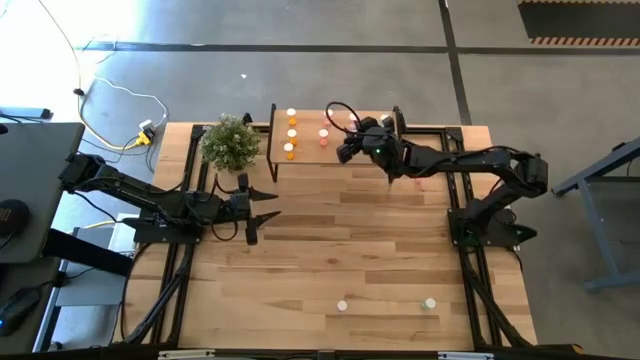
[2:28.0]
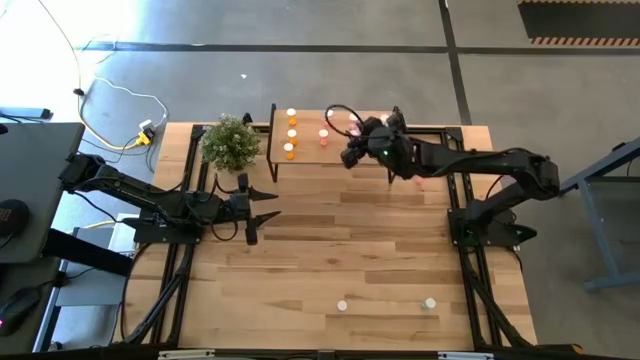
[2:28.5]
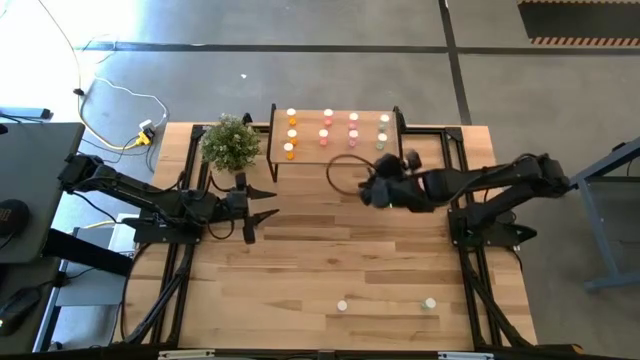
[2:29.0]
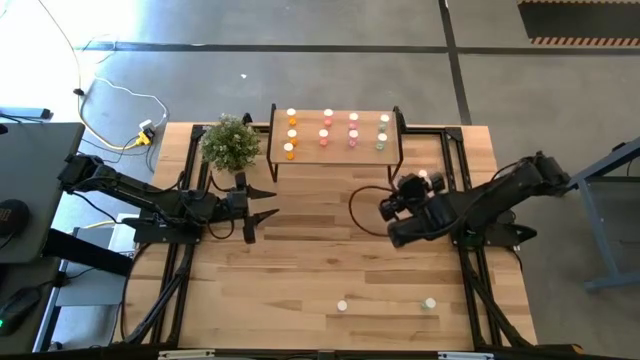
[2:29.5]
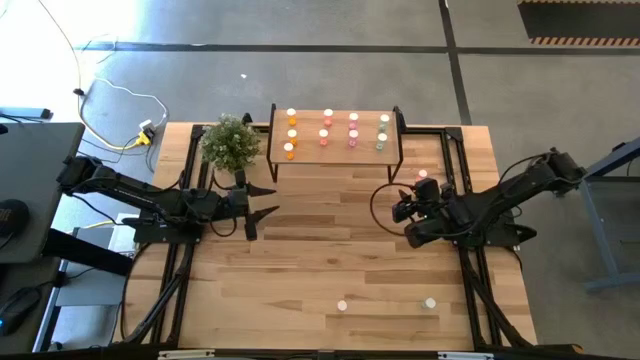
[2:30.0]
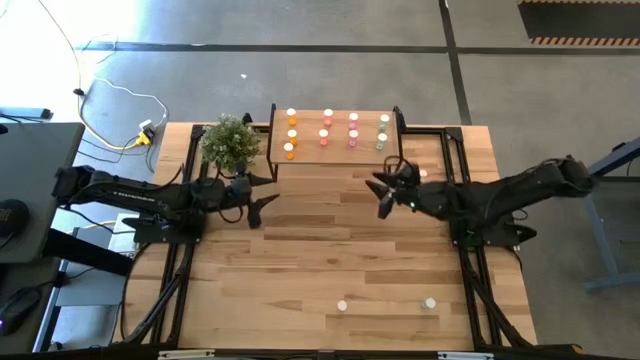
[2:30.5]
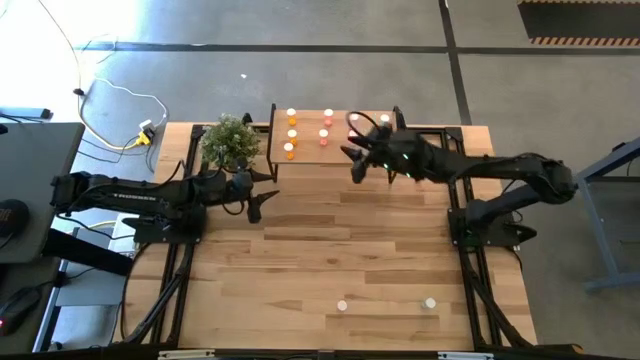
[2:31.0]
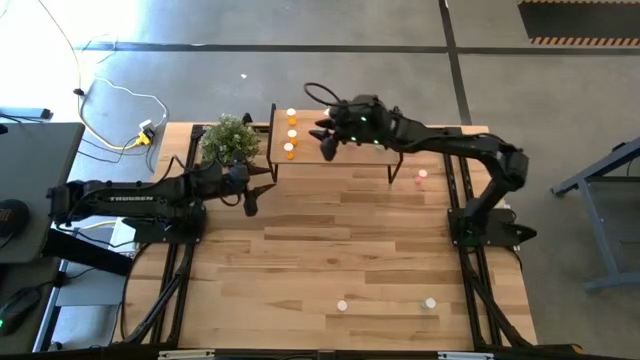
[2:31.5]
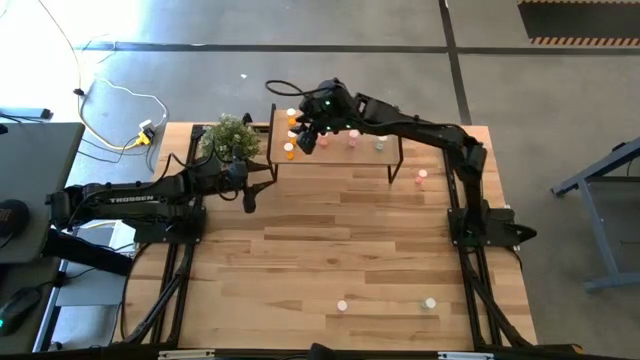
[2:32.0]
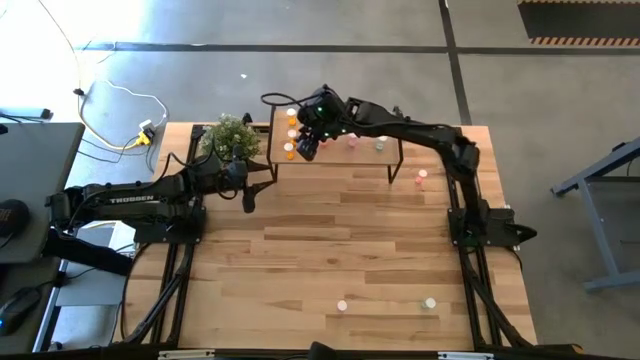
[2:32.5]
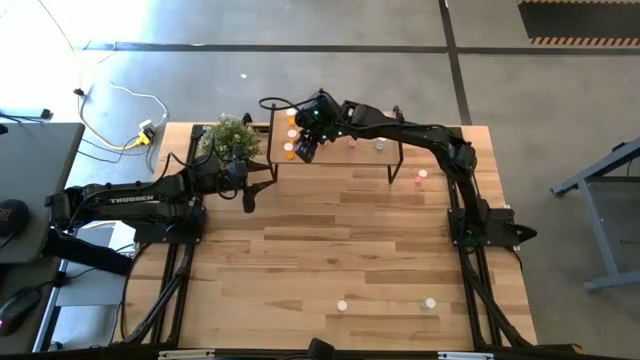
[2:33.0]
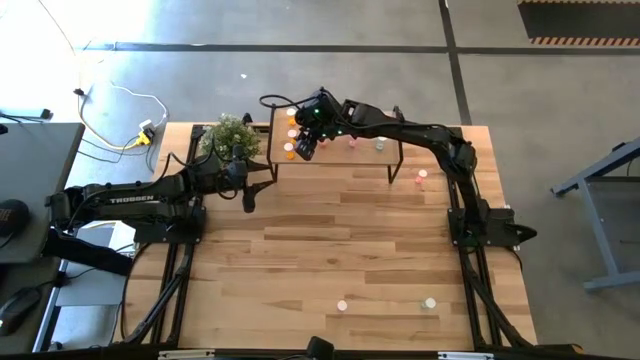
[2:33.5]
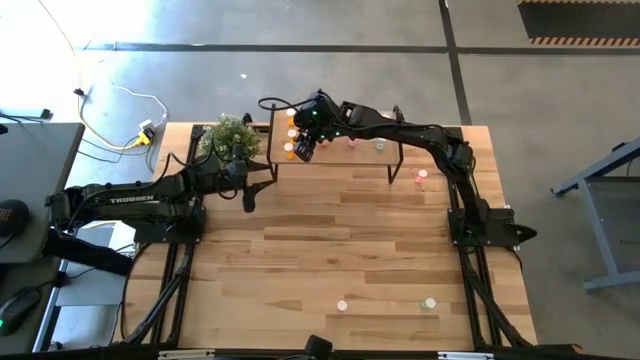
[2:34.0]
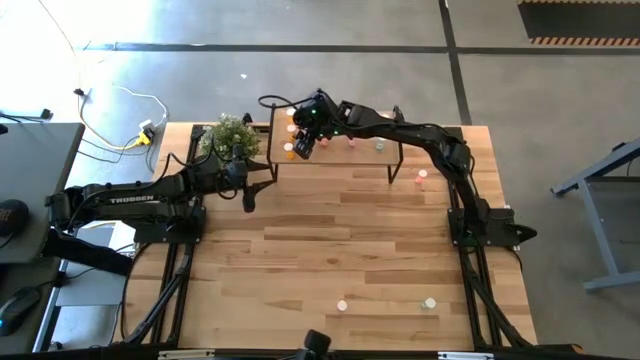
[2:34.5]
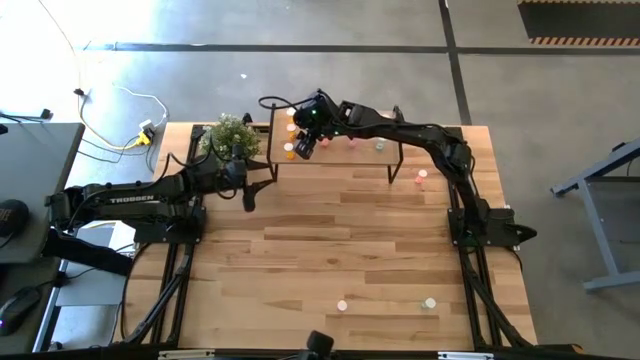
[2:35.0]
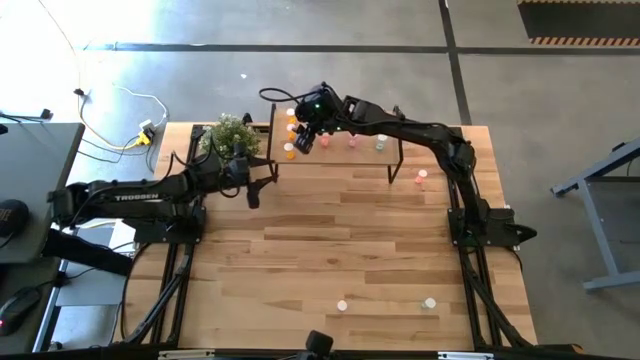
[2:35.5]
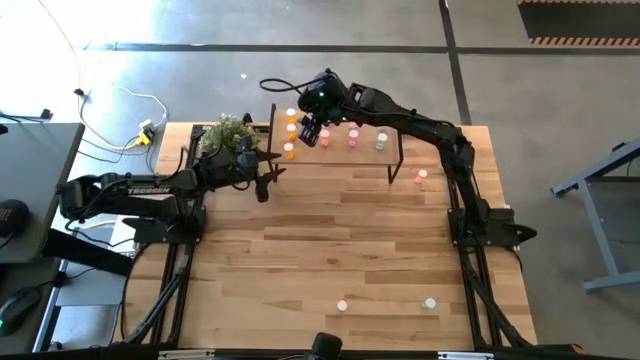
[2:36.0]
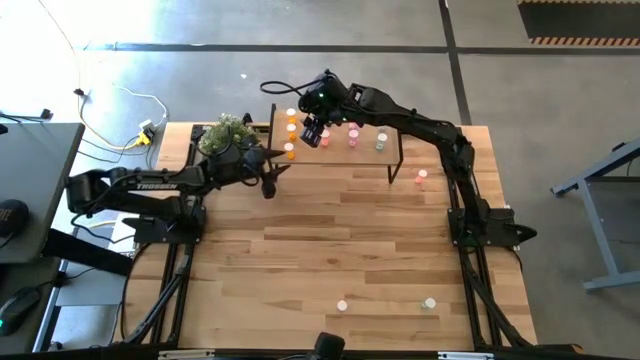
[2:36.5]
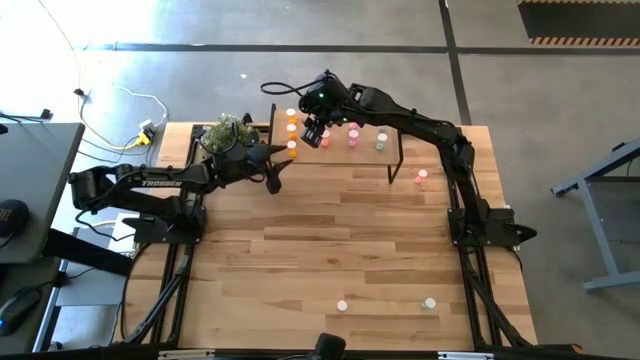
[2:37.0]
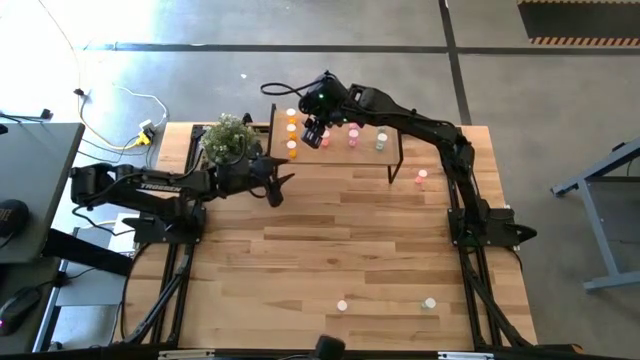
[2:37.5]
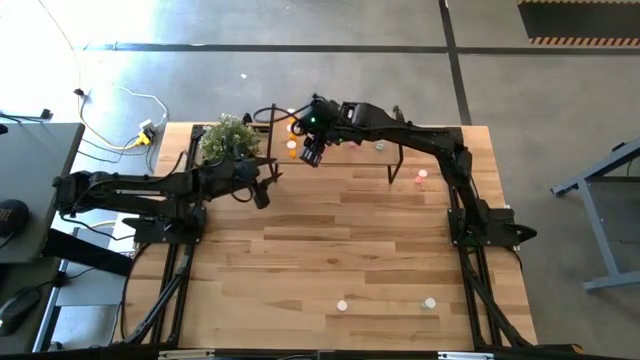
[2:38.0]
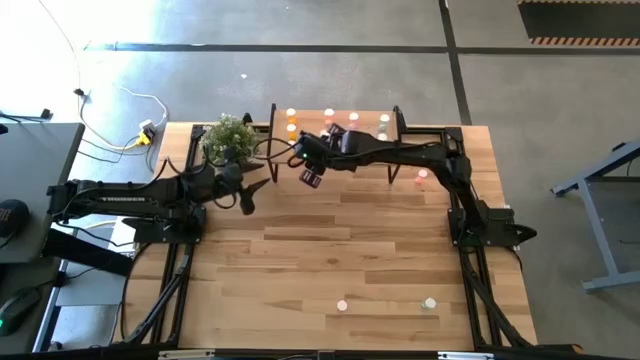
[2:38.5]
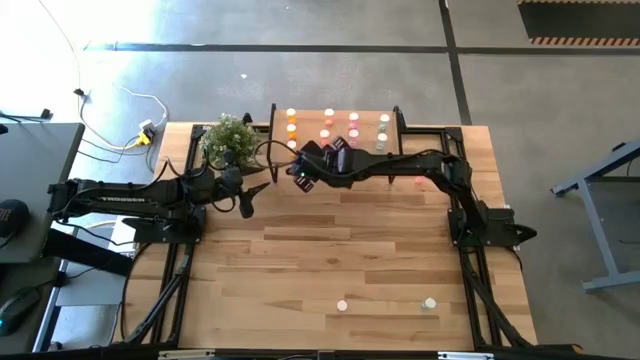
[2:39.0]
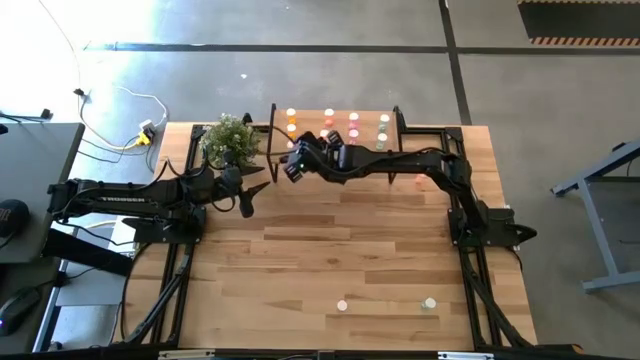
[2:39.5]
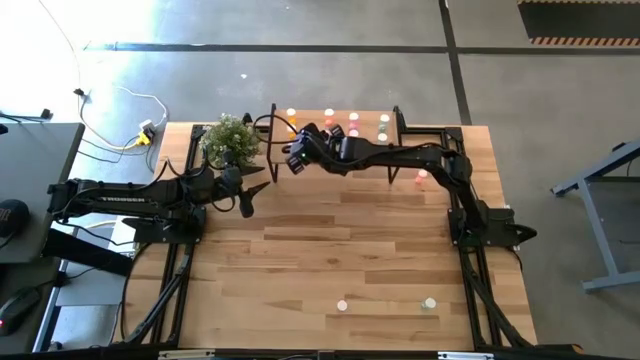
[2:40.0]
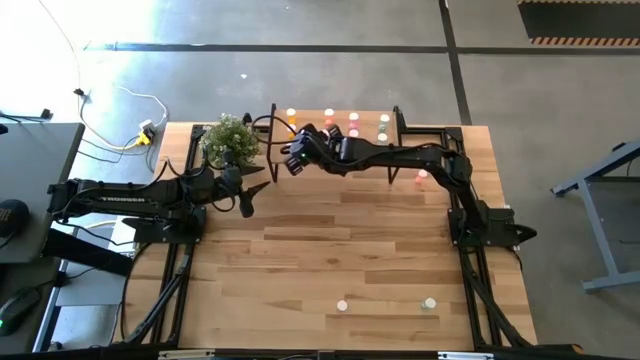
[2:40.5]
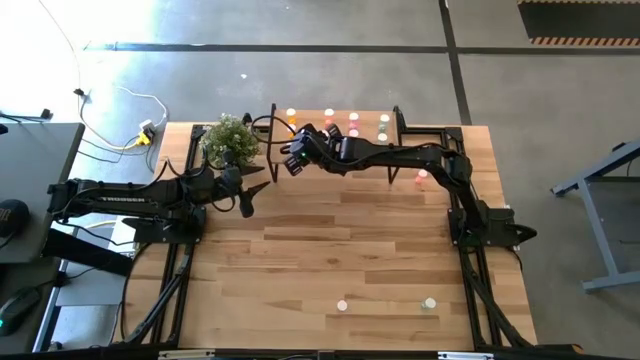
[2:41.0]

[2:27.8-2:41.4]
Task: Pick and place medicine bottles onto shelf by color
Adjust the orange pill bottles on the shelf

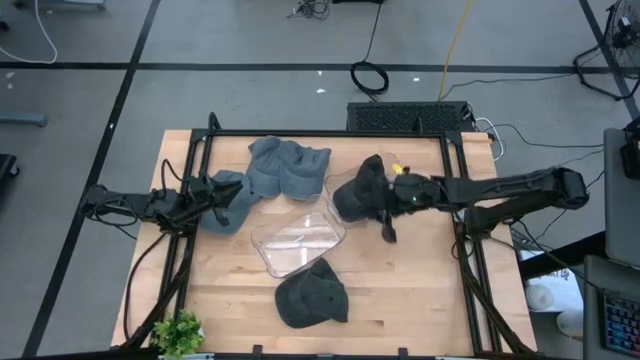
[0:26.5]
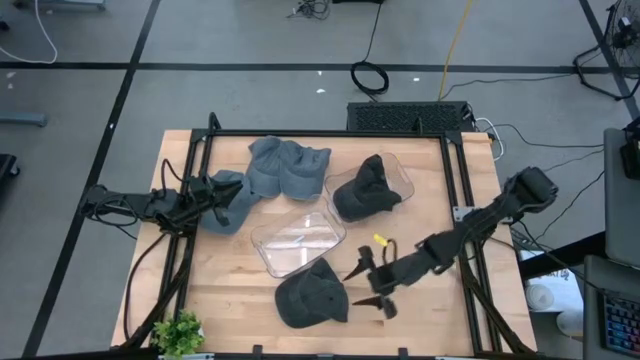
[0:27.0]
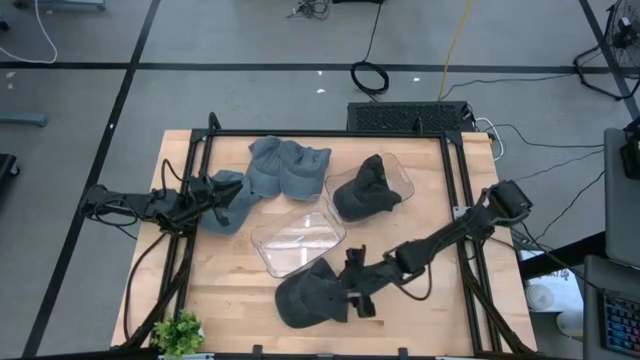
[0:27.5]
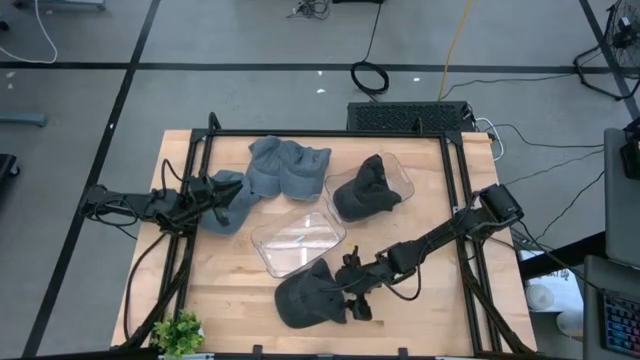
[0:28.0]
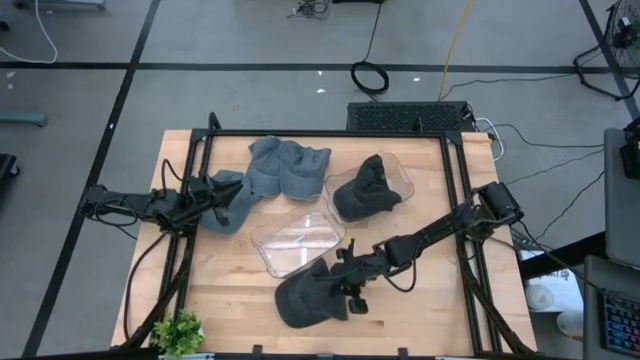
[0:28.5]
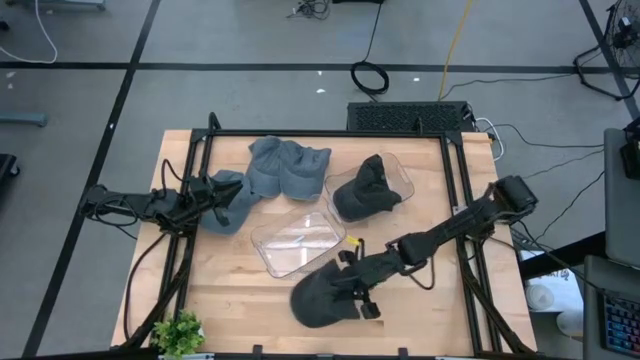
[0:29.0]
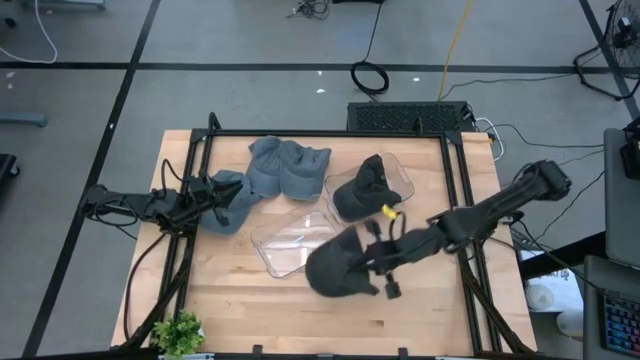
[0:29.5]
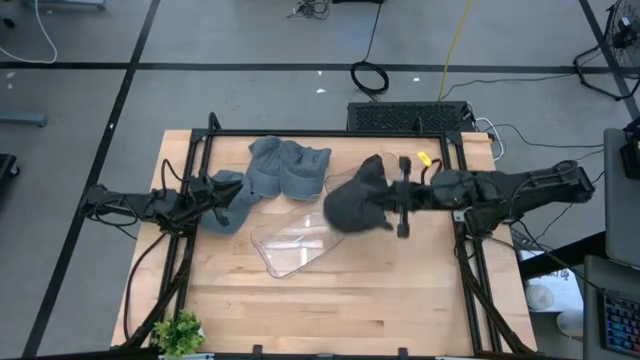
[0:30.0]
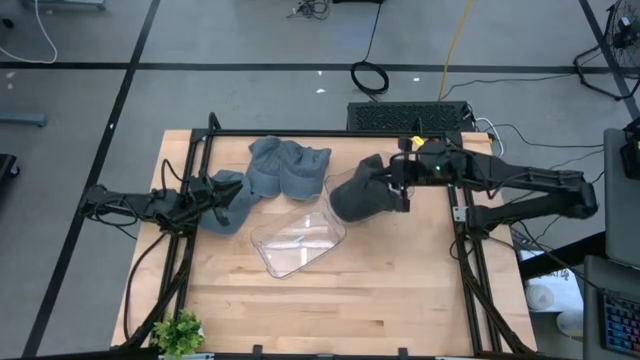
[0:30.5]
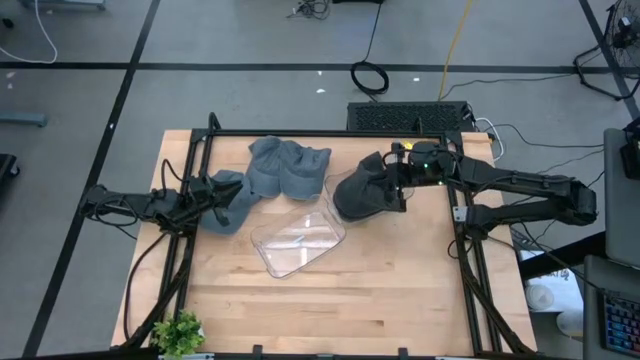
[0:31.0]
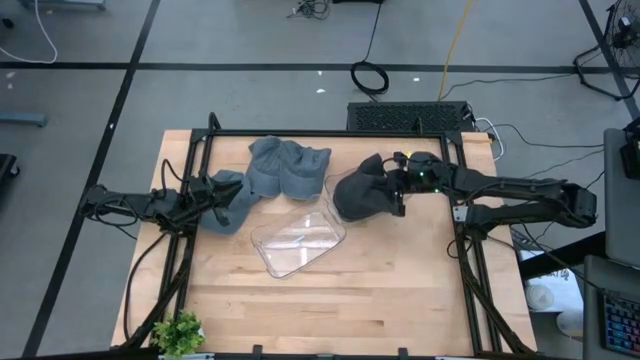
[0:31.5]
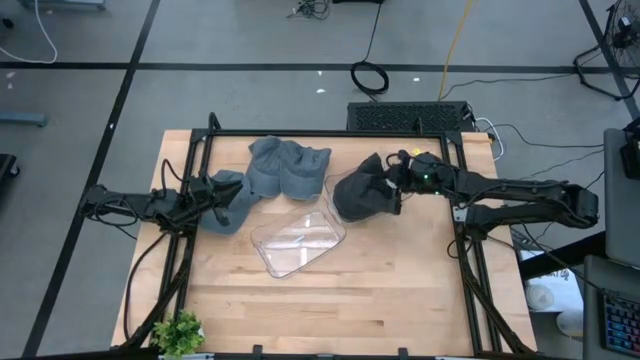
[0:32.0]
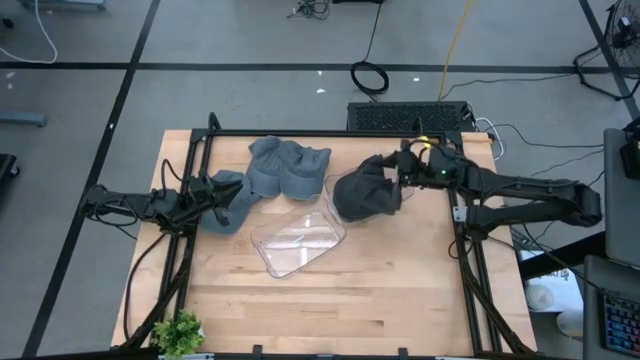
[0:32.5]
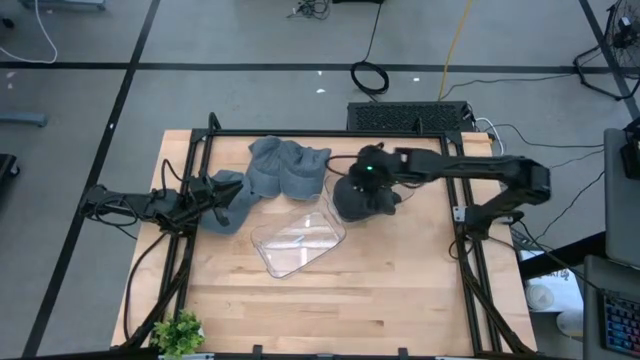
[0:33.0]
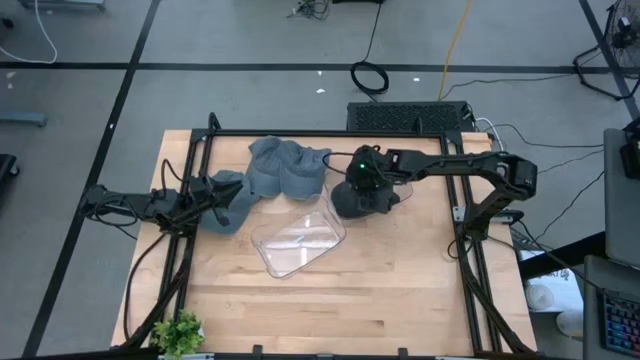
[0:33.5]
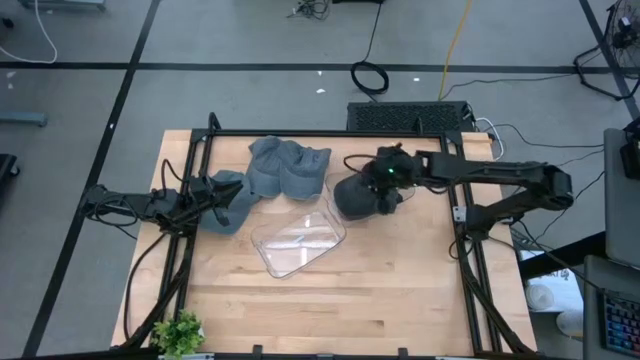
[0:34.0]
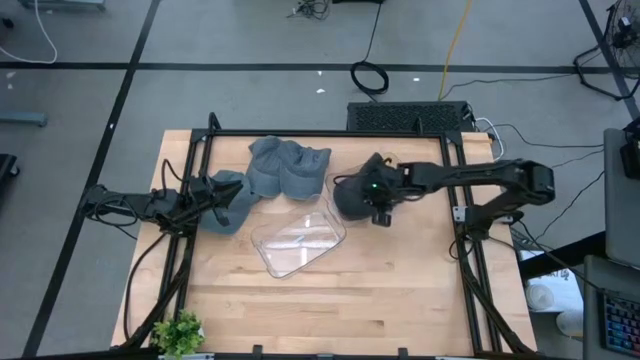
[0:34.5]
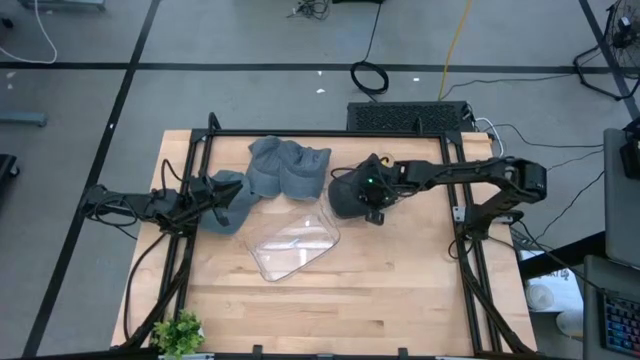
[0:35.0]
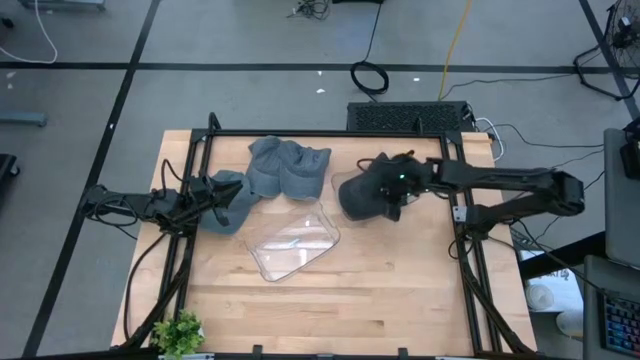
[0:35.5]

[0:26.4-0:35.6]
Task: Pick & Place hat
Put the black cap into the top transparent bin
